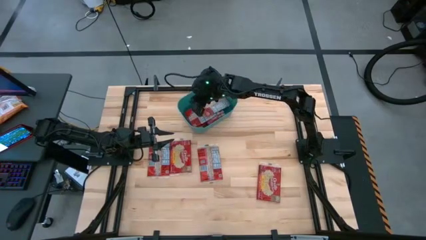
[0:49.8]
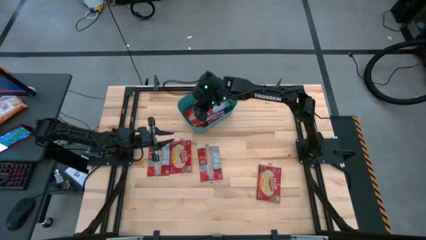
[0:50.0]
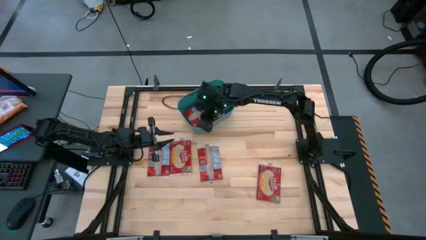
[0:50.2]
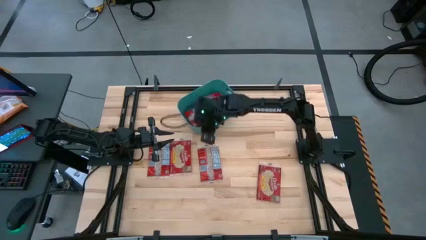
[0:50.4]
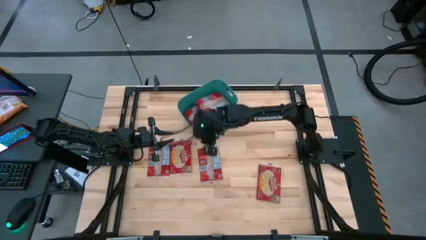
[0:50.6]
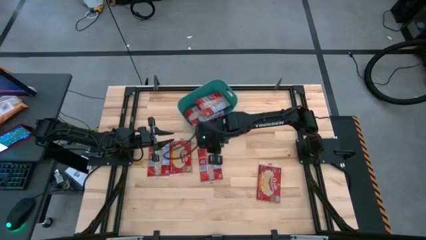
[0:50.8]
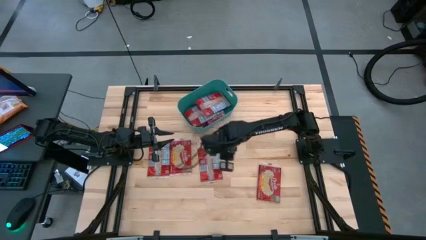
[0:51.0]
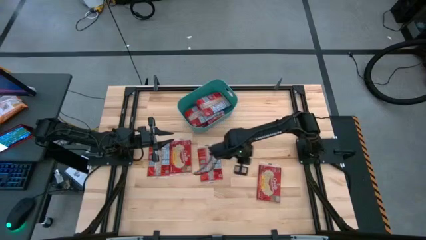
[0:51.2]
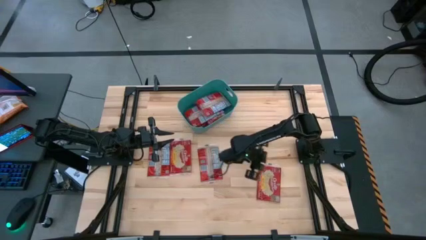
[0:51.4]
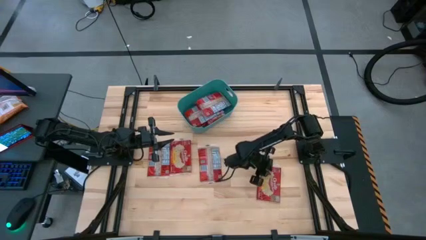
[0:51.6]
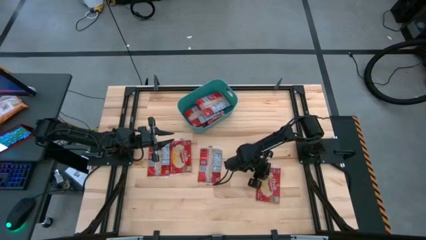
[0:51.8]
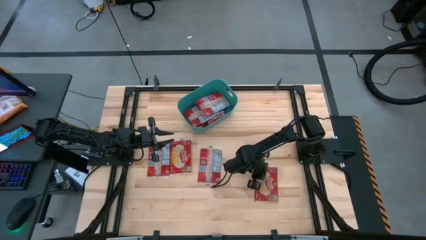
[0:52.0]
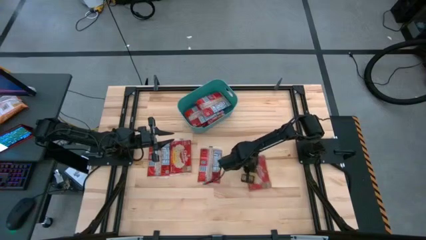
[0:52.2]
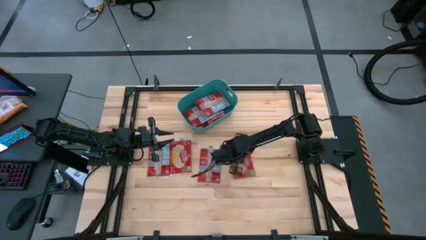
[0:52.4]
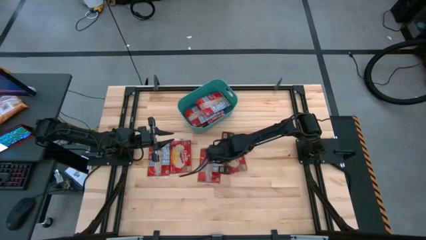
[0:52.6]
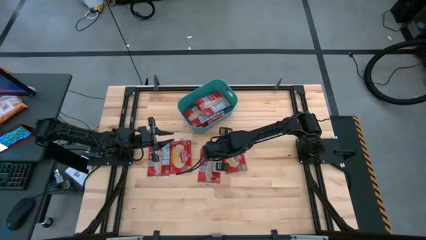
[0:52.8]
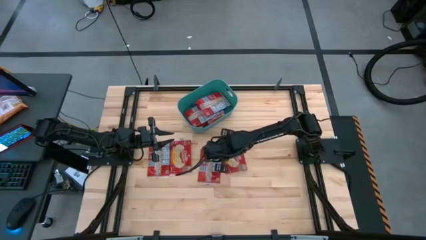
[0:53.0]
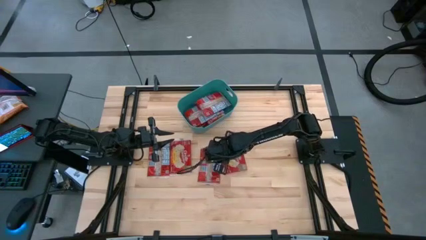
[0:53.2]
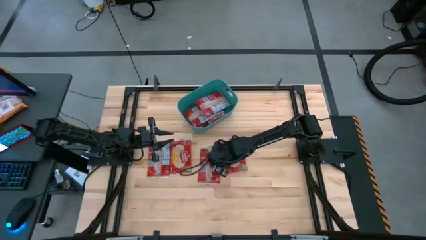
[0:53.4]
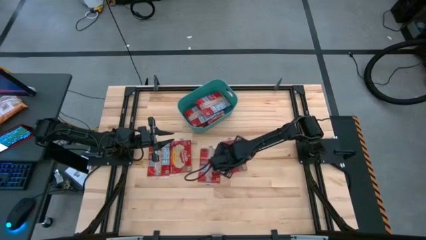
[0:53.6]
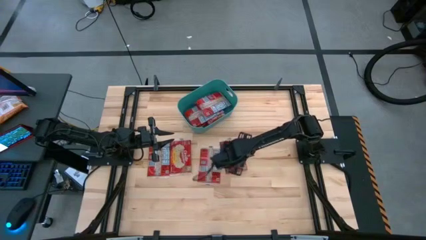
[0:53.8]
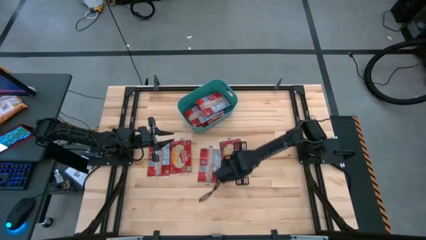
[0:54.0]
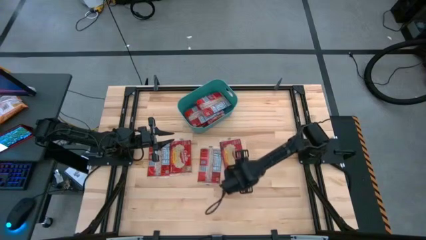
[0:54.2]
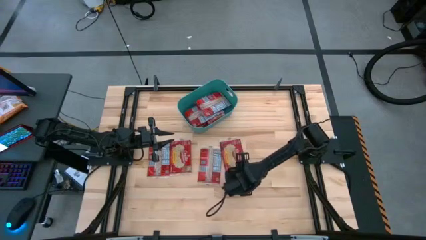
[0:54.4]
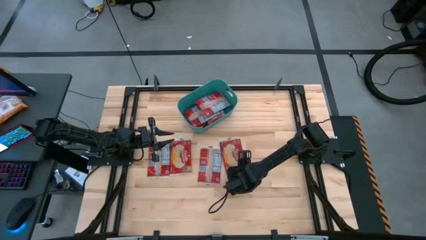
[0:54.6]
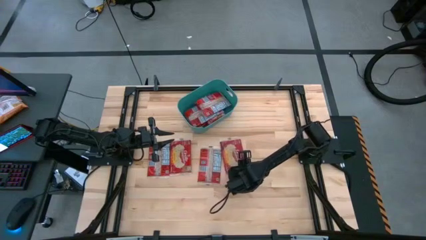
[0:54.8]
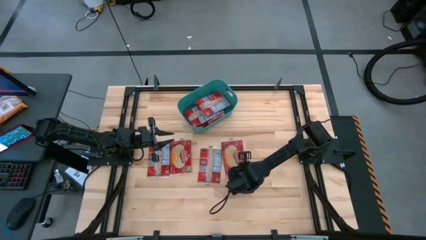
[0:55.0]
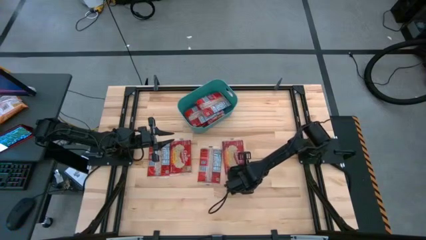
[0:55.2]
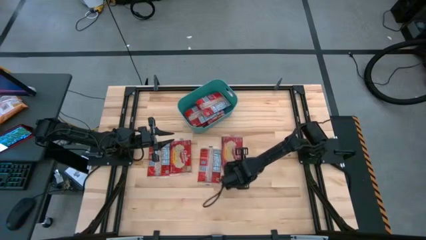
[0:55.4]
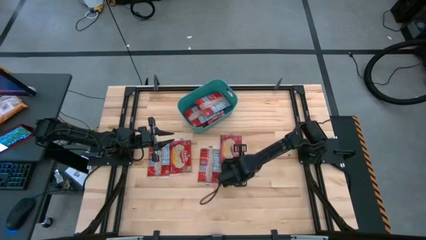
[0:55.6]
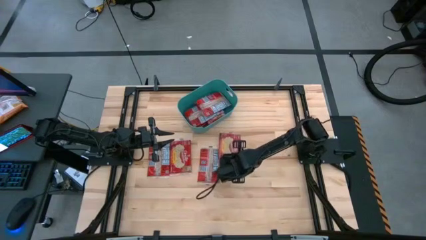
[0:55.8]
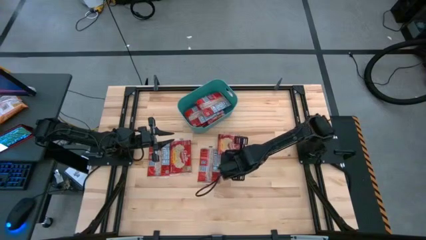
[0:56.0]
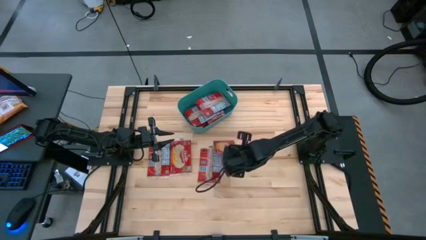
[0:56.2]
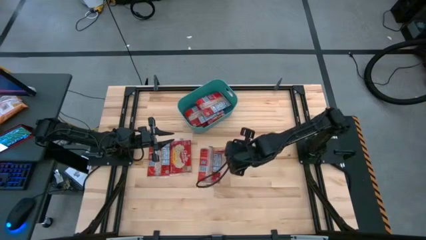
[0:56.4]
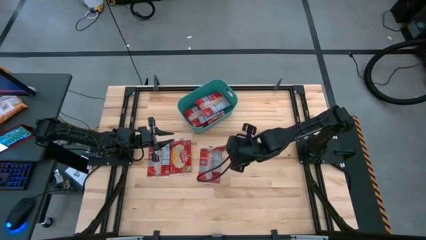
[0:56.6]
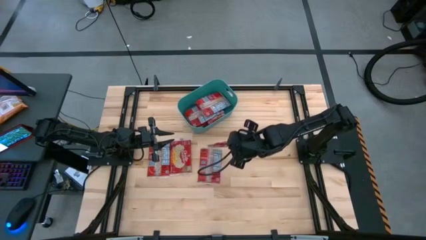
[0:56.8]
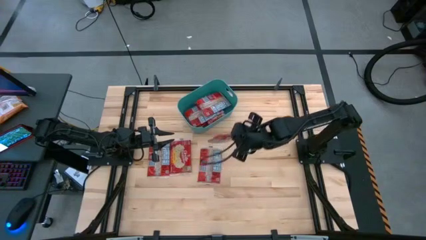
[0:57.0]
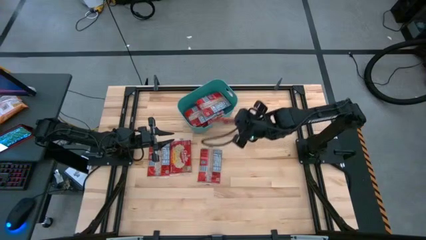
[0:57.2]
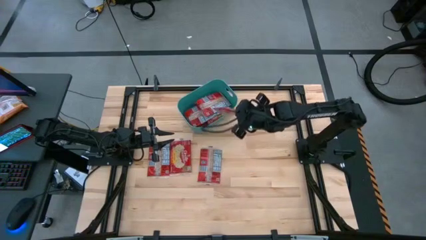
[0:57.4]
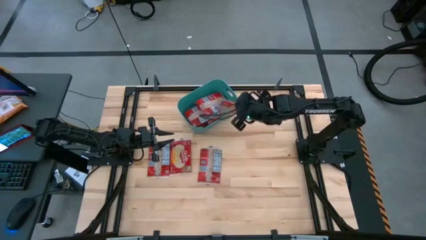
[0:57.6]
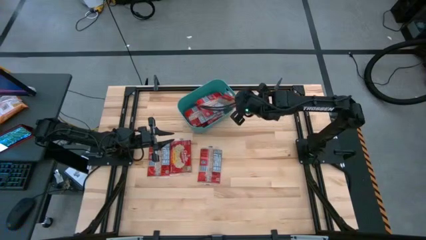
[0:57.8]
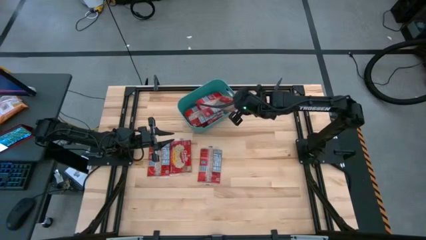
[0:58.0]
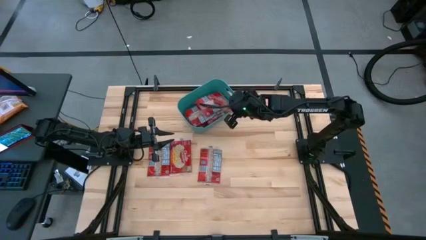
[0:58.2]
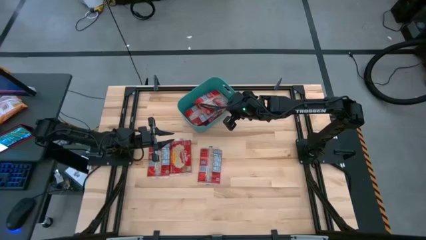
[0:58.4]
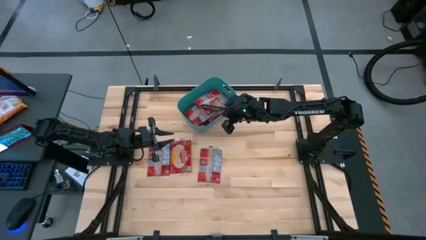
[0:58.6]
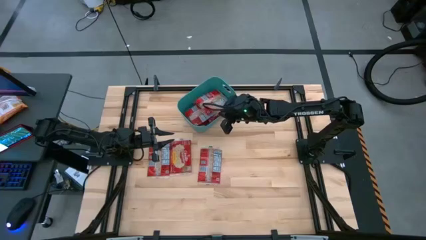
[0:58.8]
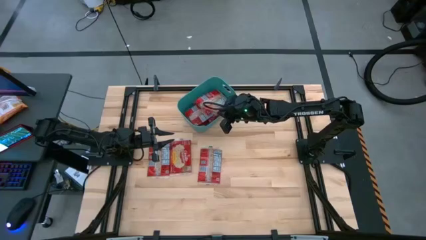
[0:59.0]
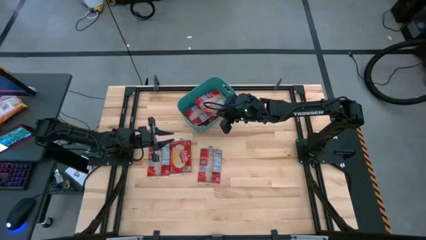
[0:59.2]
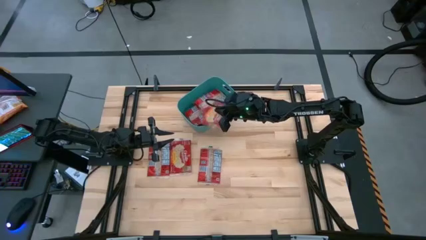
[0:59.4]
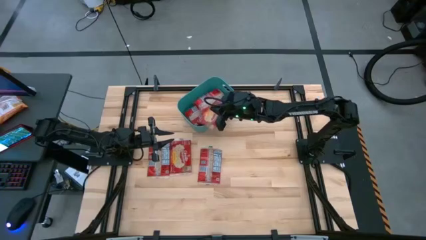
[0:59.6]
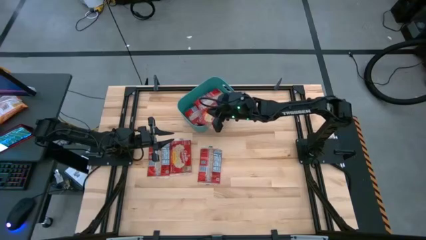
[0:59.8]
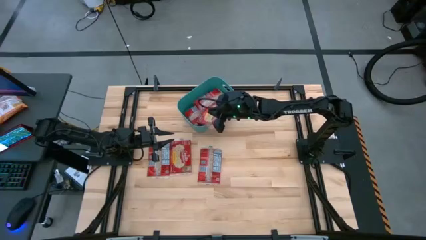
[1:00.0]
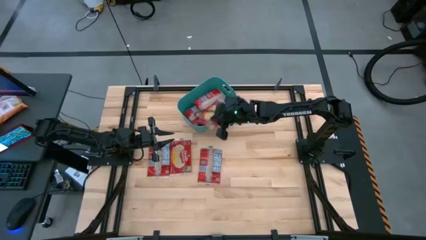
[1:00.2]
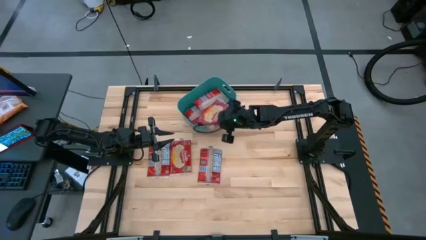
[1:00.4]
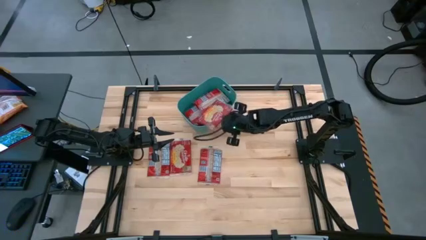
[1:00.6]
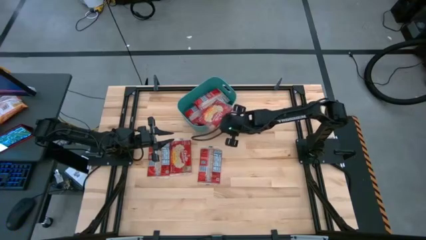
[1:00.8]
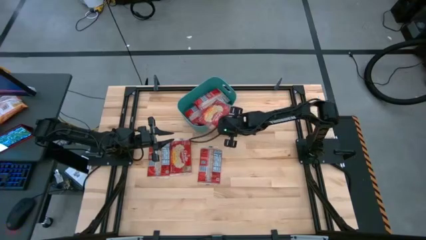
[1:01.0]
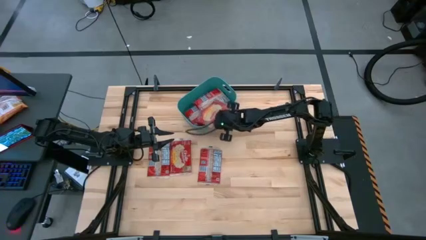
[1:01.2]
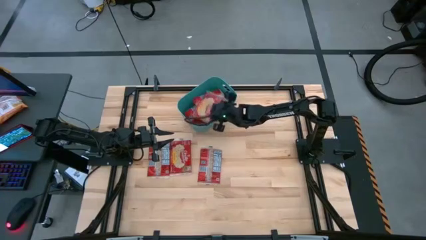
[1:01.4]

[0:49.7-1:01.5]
Task: Sort popcorn bags into baskets
Put the popcorn bag into the blue bin
